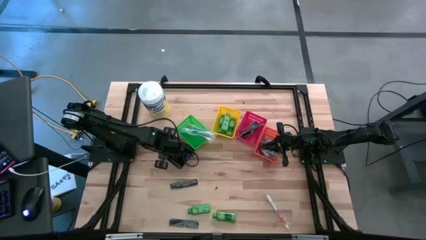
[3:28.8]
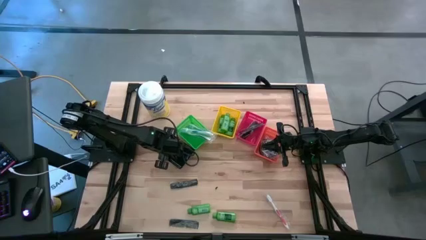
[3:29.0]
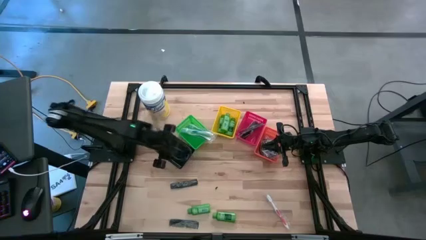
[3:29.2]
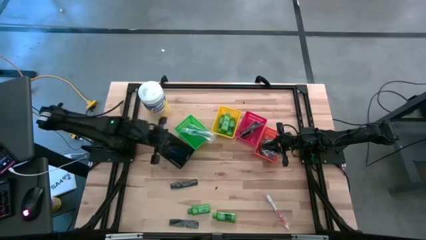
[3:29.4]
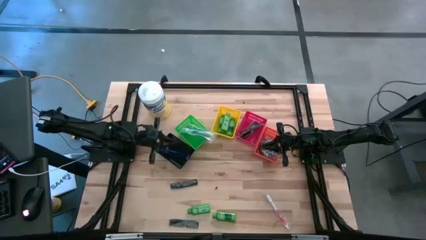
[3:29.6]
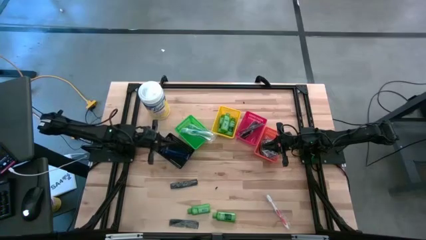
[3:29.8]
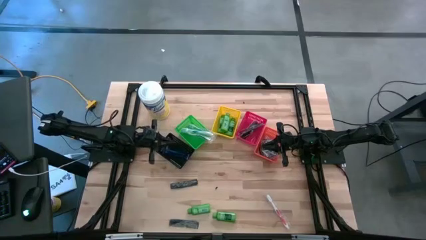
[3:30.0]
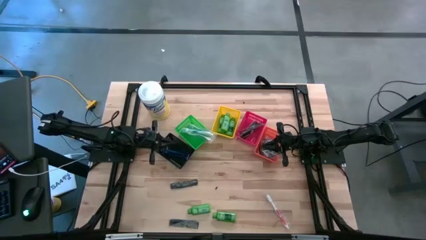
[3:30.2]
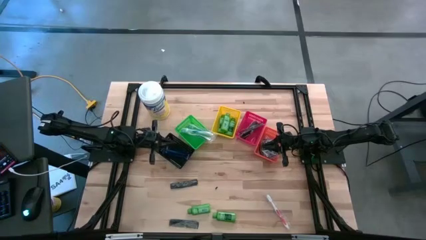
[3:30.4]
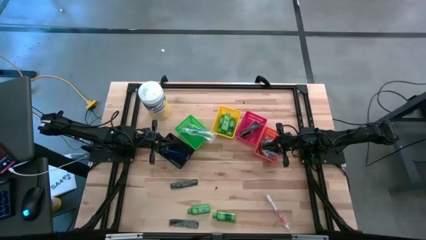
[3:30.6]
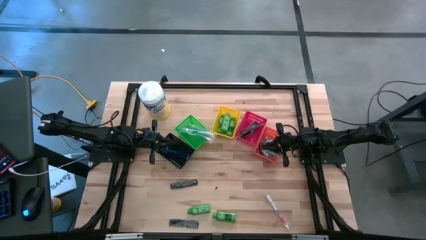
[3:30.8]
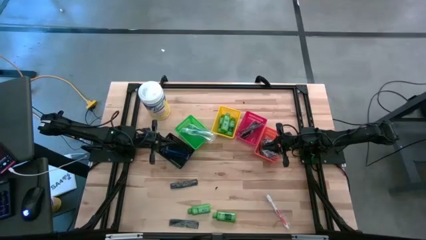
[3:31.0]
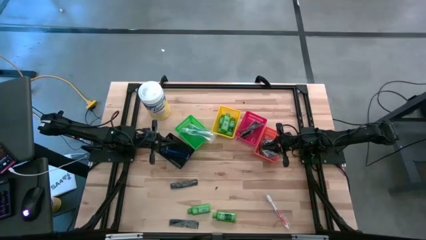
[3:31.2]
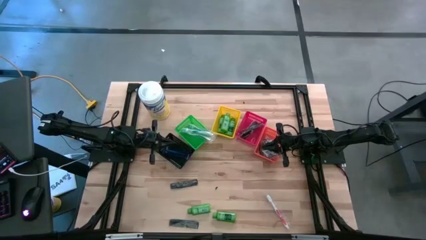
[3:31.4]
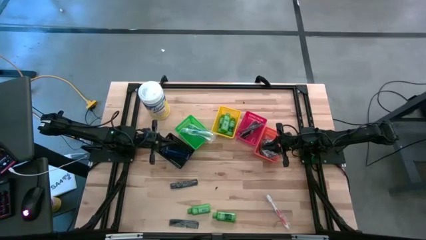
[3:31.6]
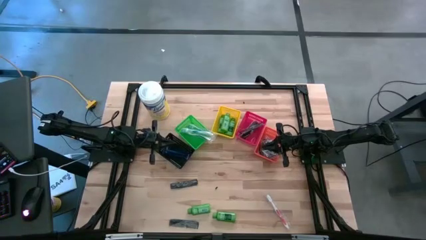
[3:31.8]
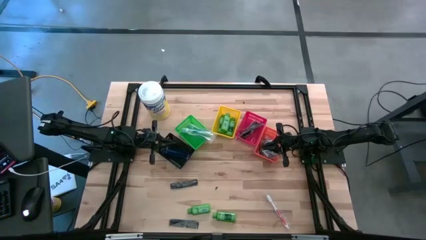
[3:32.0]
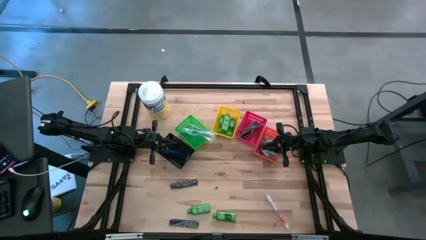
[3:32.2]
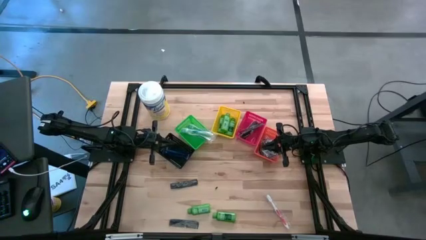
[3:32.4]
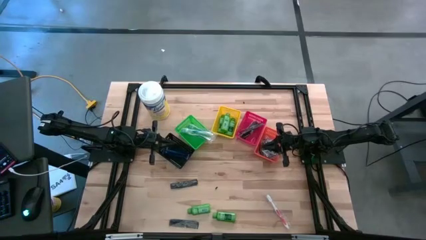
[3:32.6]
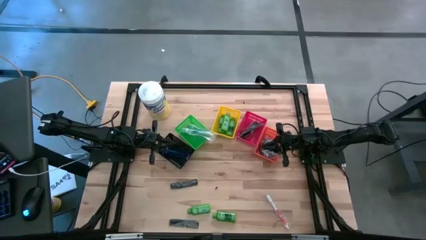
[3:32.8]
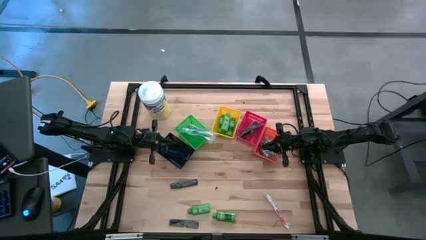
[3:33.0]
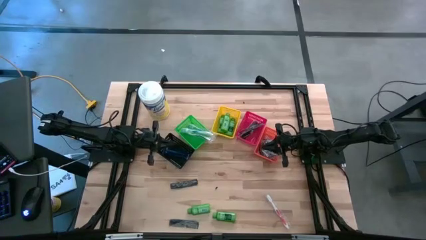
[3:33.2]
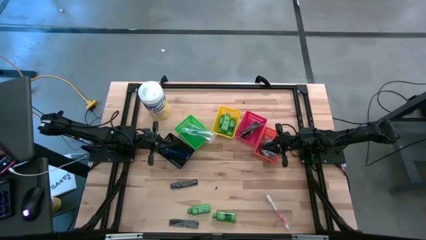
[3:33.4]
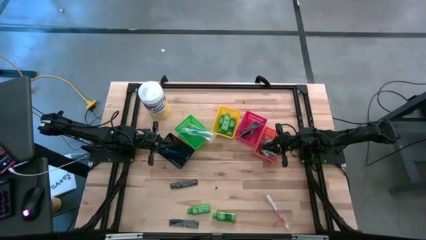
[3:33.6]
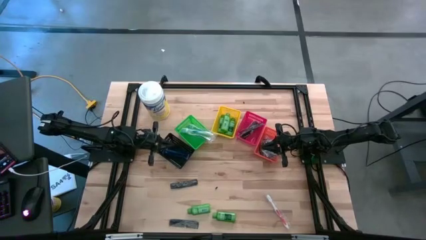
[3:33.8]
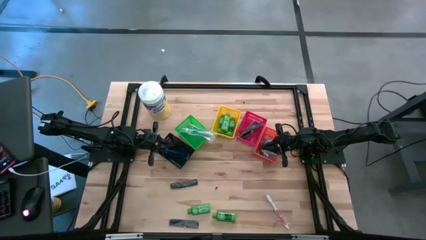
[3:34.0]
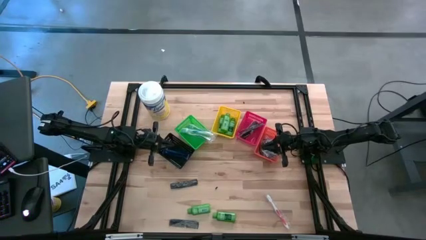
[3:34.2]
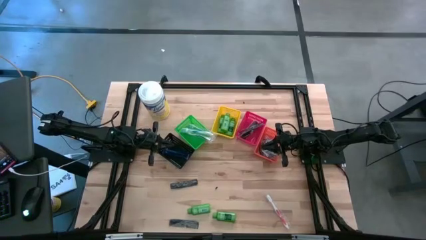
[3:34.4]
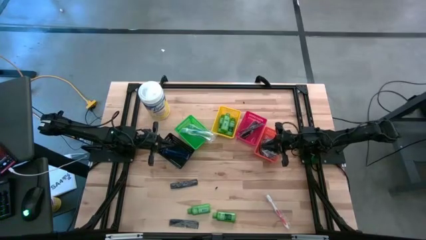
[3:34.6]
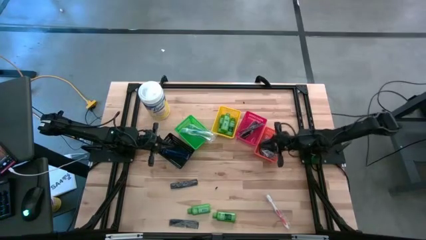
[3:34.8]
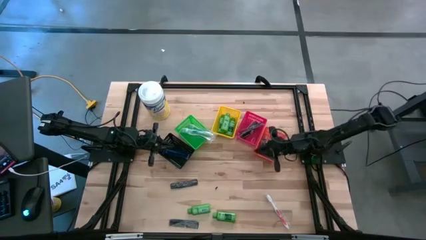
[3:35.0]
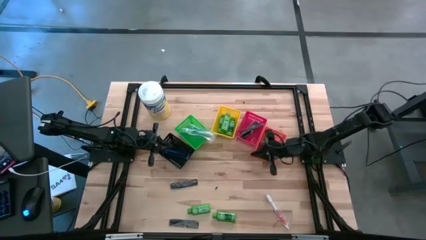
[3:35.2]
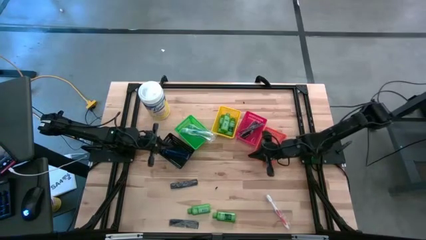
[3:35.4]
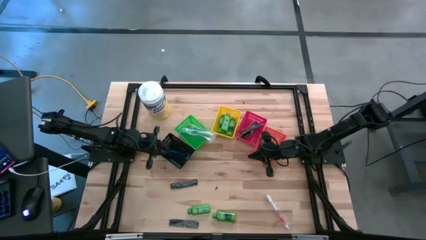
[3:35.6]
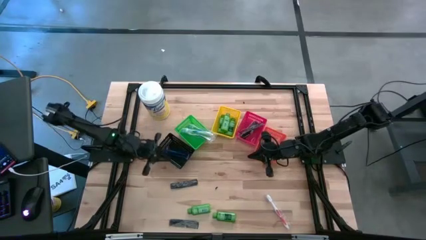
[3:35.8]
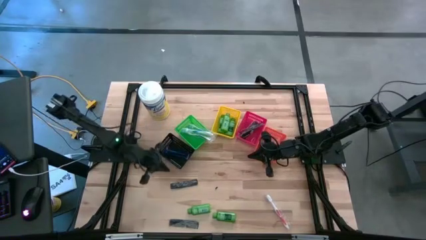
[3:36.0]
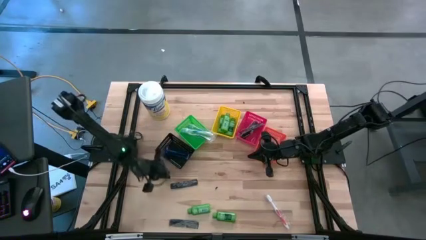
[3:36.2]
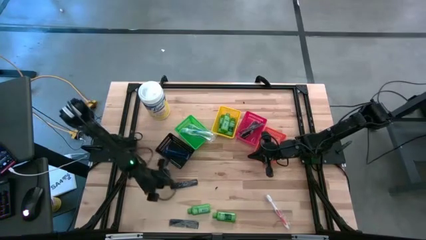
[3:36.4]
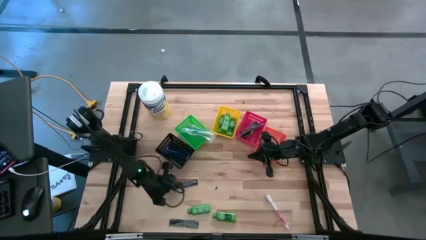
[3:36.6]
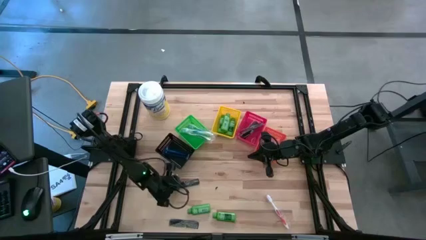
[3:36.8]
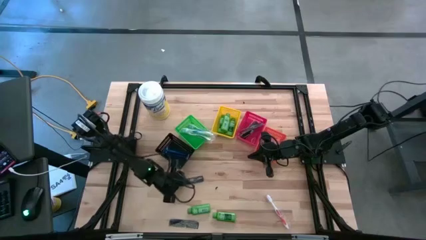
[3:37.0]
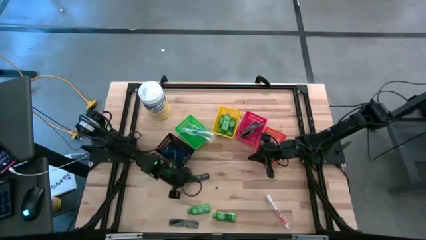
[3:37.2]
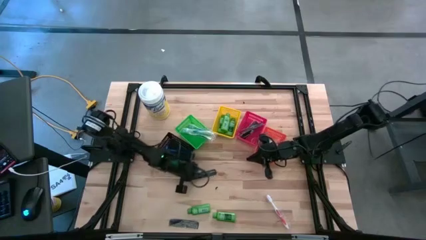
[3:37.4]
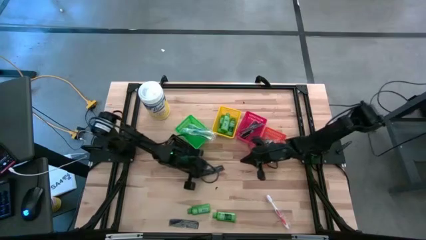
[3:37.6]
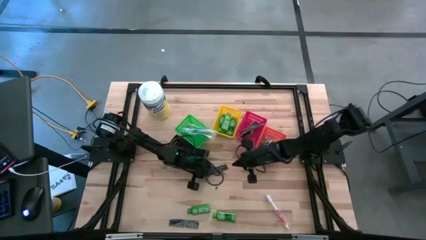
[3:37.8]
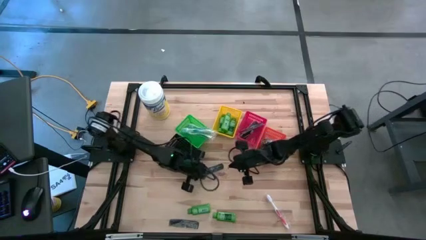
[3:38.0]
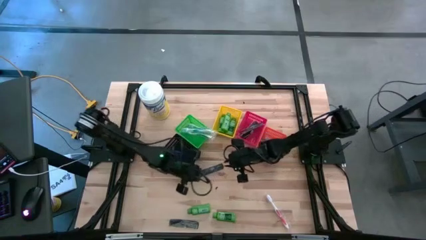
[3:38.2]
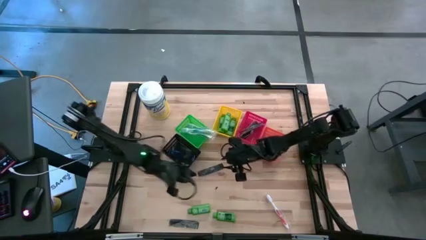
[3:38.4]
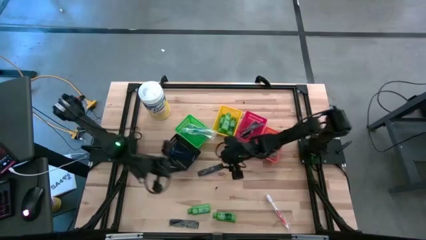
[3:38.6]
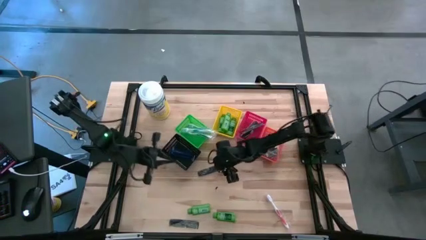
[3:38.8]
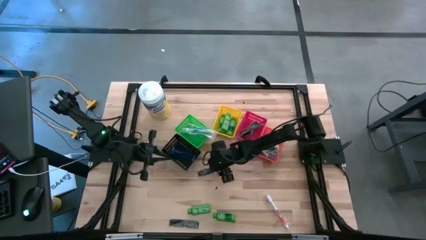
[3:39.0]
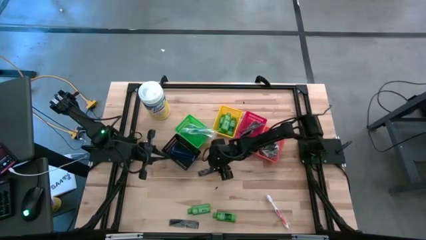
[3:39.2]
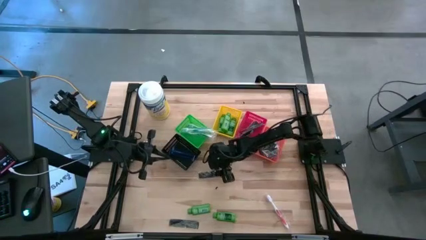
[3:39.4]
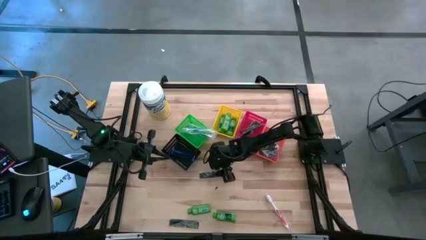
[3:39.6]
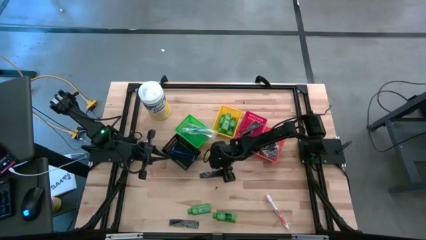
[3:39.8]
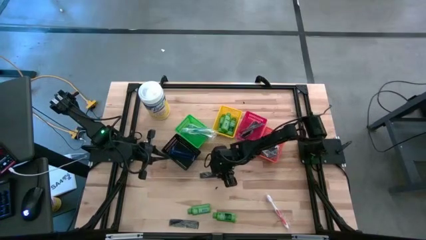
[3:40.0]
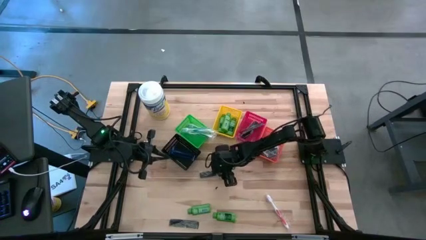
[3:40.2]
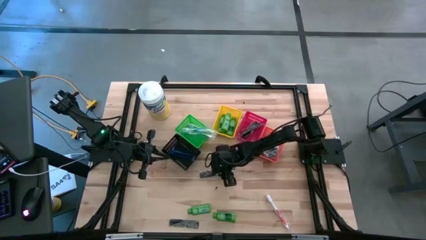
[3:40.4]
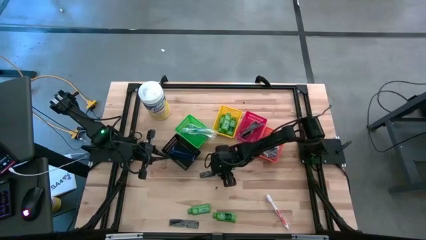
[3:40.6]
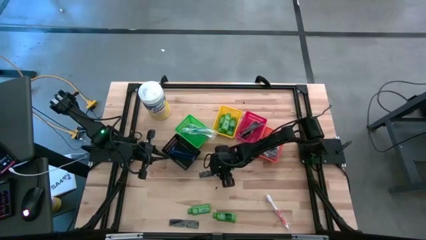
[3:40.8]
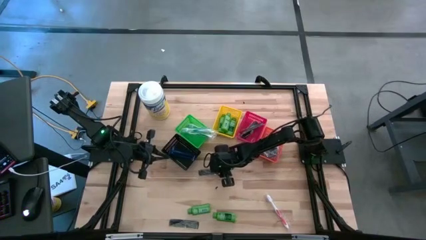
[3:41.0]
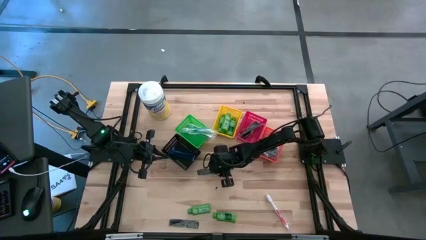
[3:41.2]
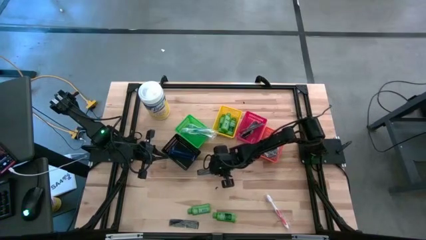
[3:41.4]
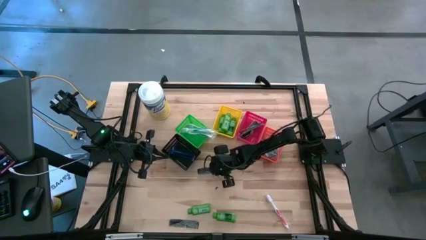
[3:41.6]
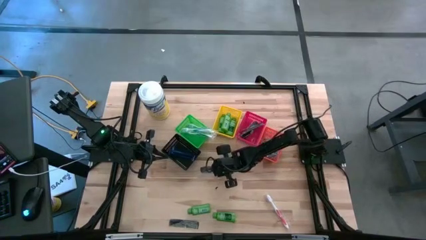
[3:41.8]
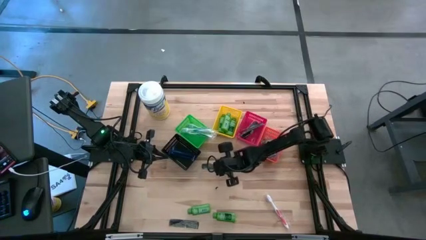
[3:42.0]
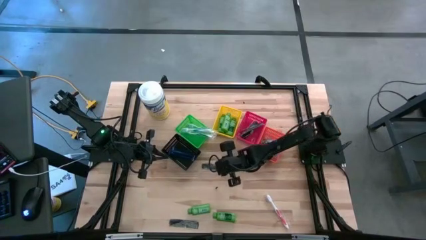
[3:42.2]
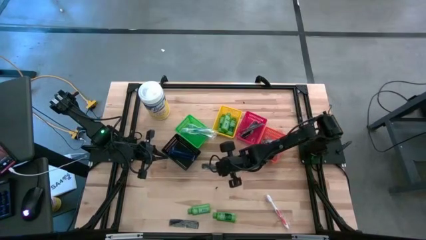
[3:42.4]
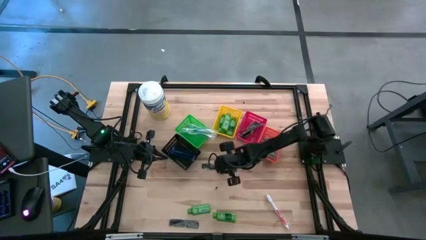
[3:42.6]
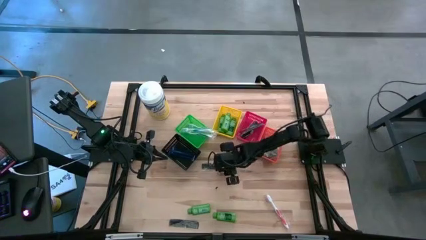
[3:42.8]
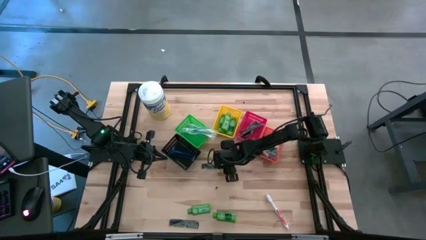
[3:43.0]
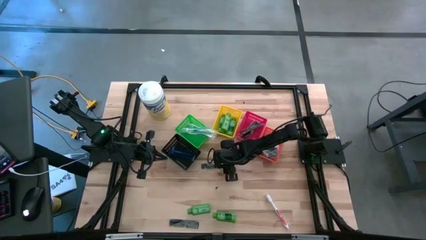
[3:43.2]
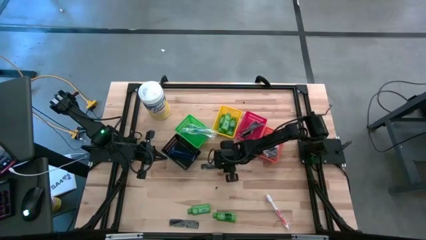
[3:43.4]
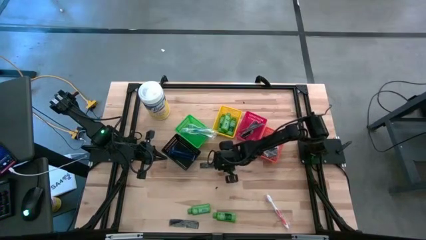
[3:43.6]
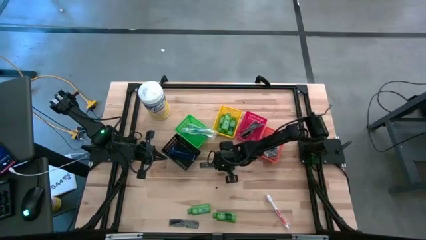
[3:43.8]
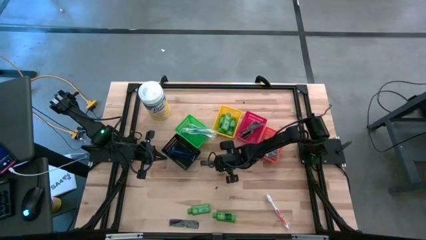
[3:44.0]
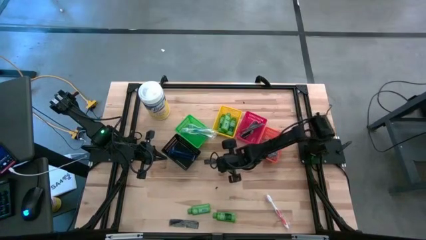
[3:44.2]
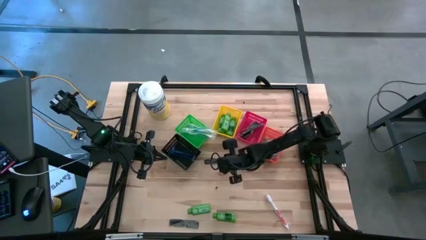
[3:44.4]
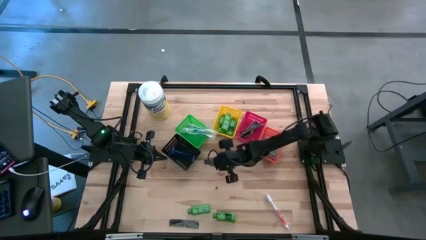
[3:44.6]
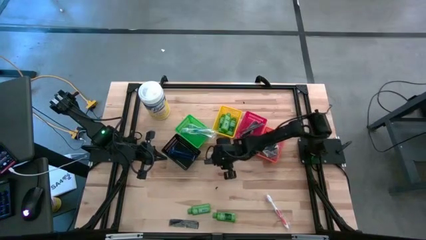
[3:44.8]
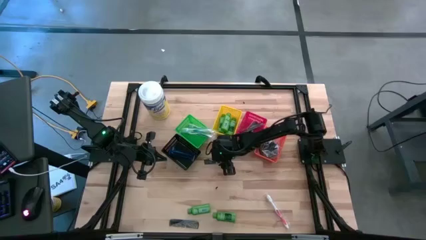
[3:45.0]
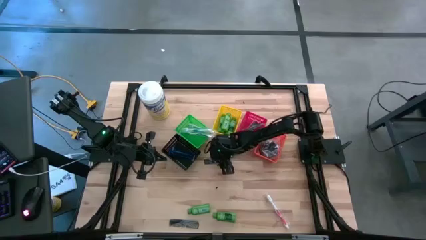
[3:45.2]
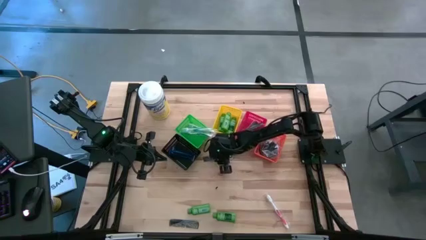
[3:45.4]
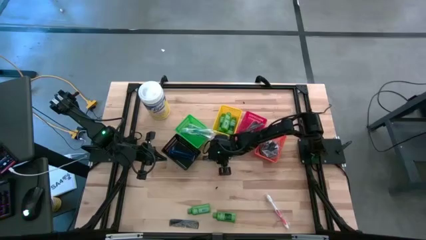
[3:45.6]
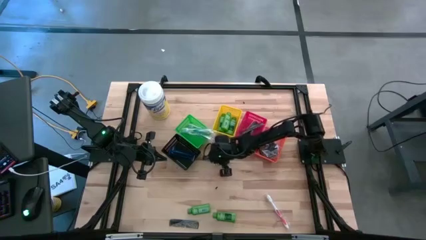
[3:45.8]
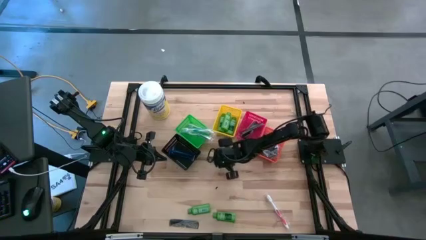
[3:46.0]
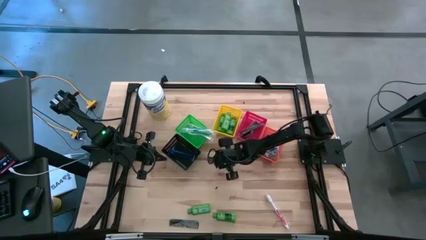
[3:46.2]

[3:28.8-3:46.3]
Task: Pick & Place Travel size toiletries
Put the black comb into the red bin
